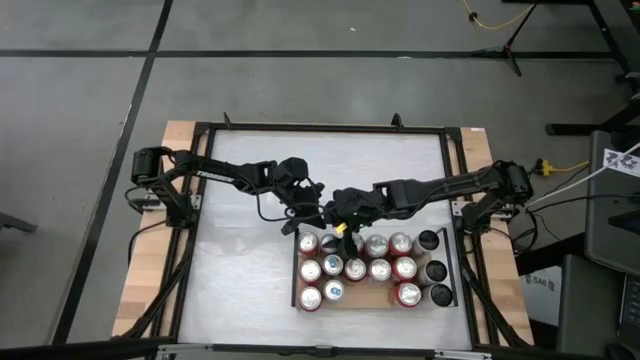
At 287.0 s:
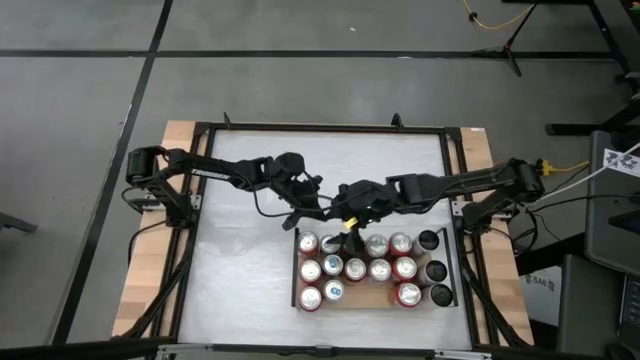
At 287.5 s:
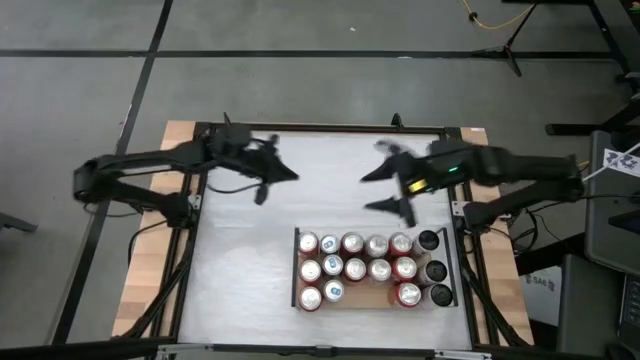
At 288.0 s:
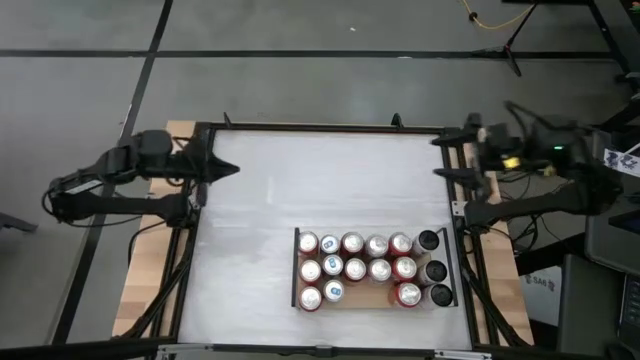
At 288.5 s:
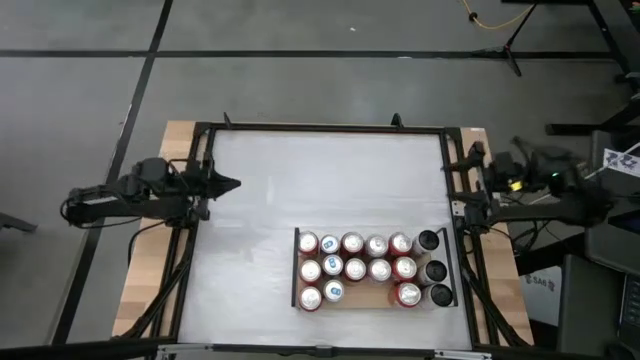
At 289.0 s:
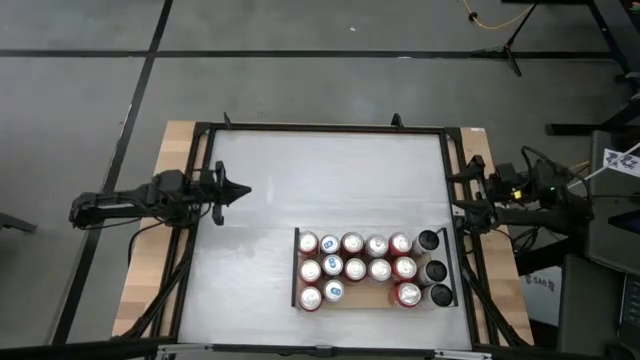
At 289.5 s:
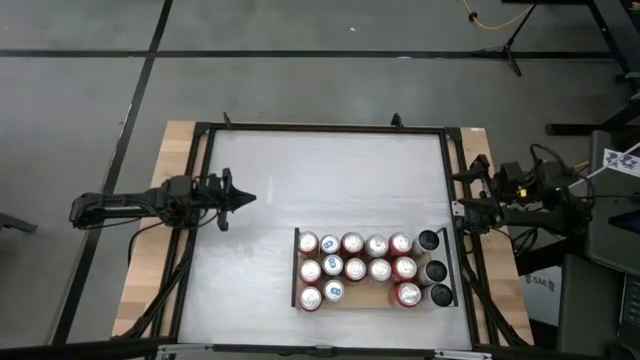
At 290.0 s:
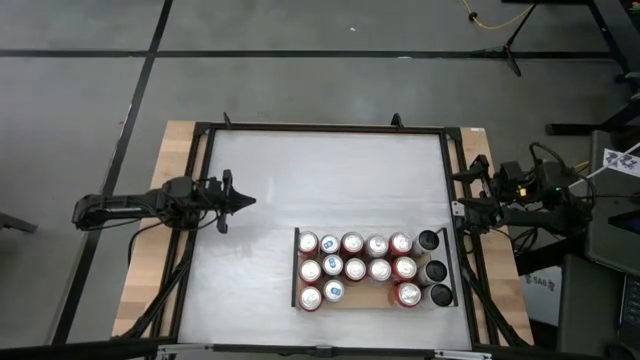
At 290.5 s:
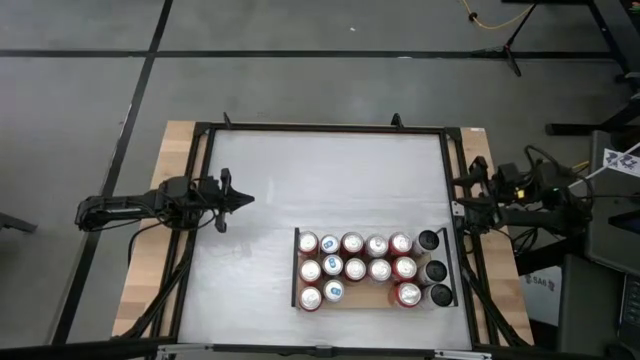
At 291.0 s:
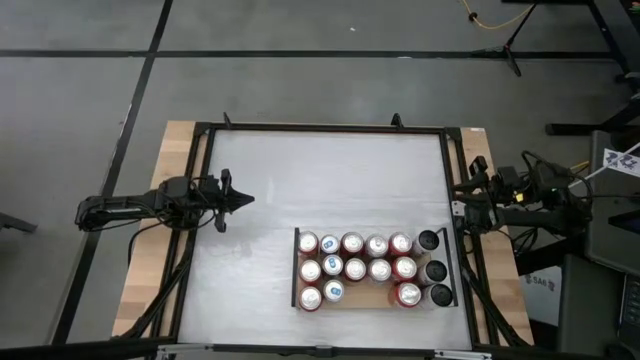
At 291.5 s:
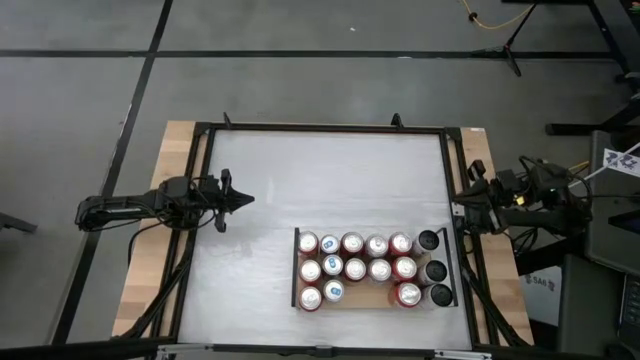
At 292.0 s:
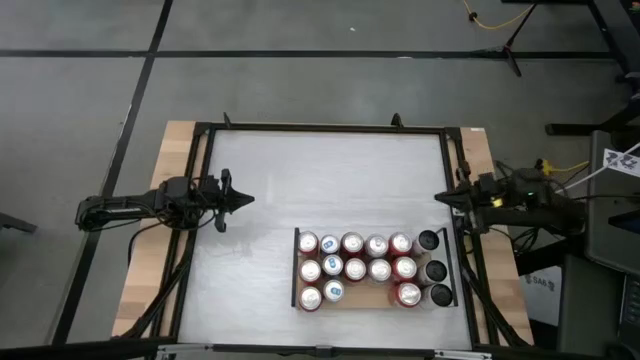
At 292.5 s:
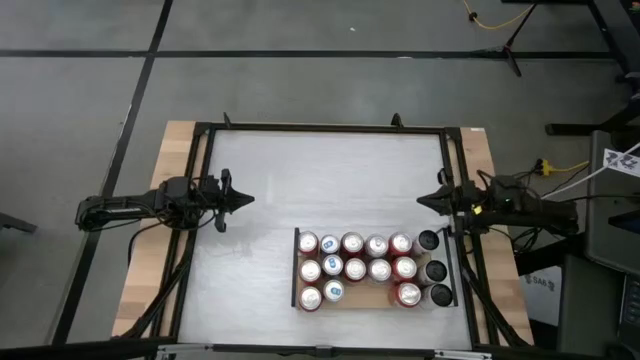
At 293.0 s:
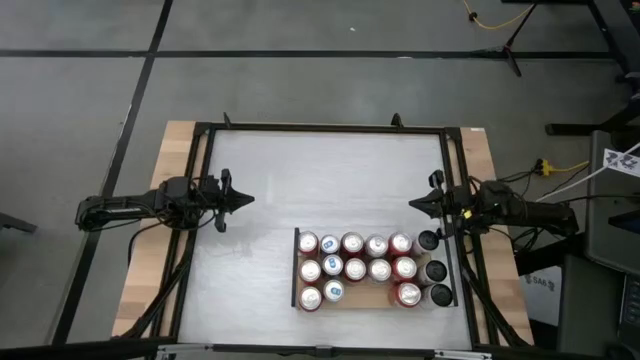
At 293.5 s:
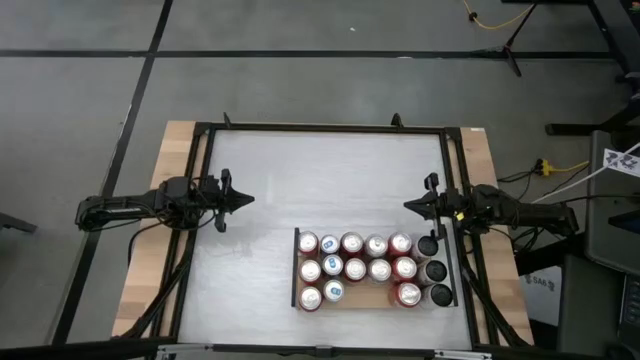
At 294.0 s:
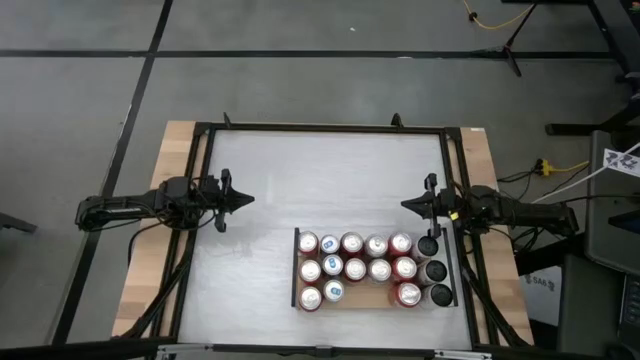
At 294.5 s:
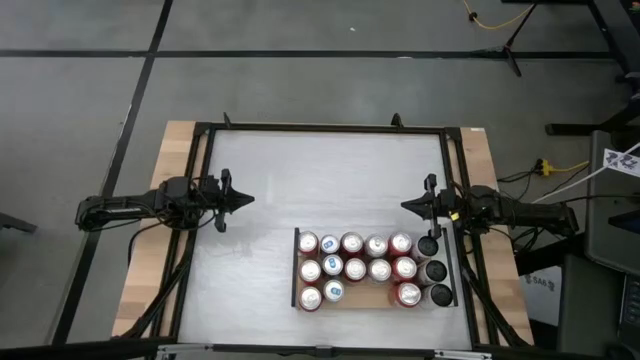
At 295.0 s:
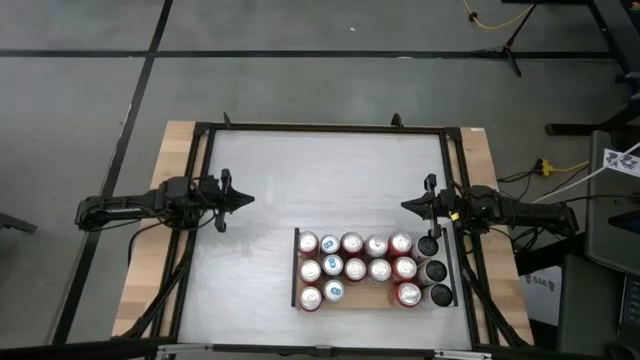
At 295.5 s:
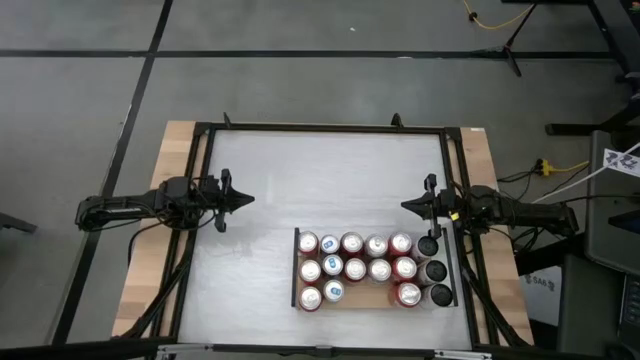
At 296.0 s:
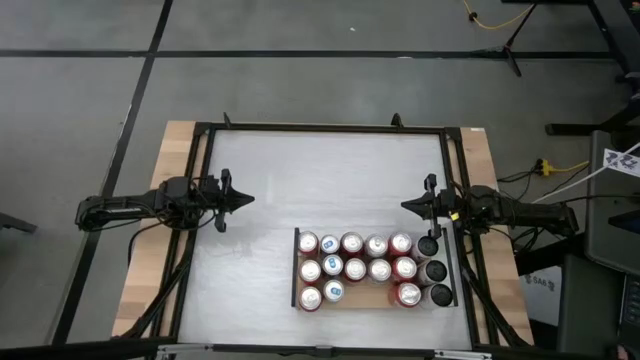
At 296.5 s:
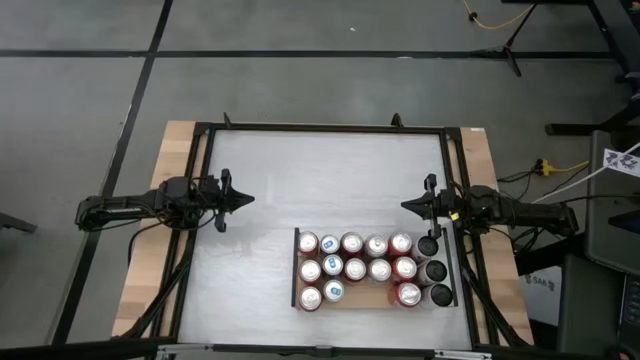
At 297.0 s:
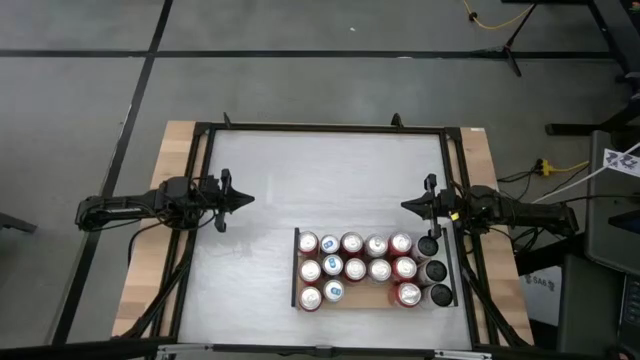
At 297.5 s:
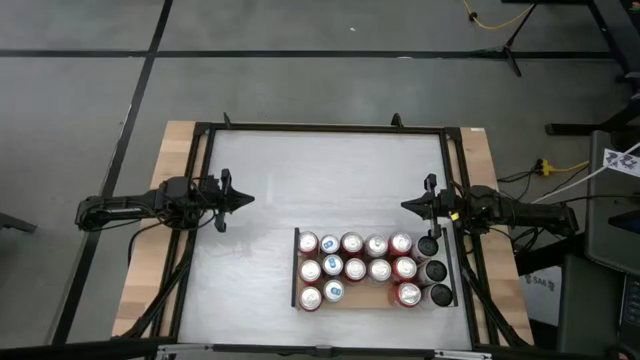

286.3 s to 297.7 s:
Task: Place canned beverage on shelf
Return to Home Position

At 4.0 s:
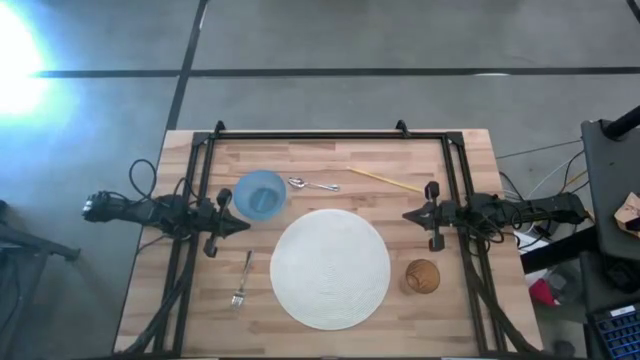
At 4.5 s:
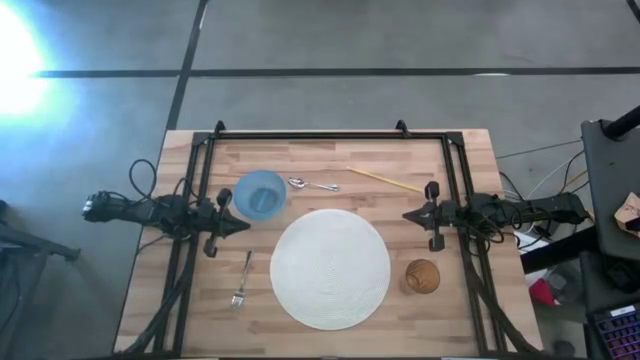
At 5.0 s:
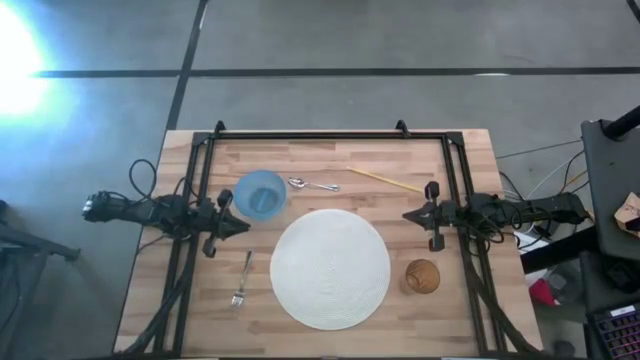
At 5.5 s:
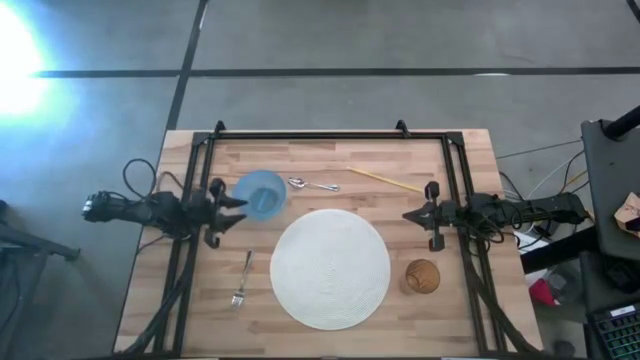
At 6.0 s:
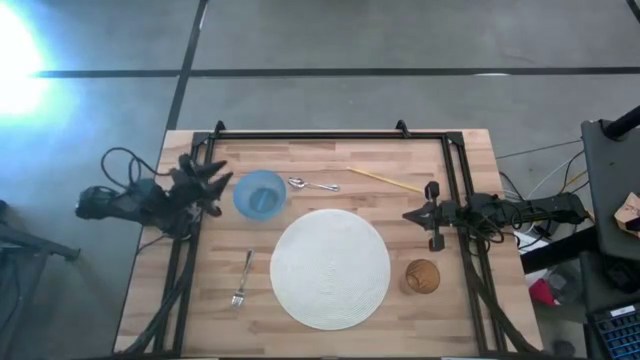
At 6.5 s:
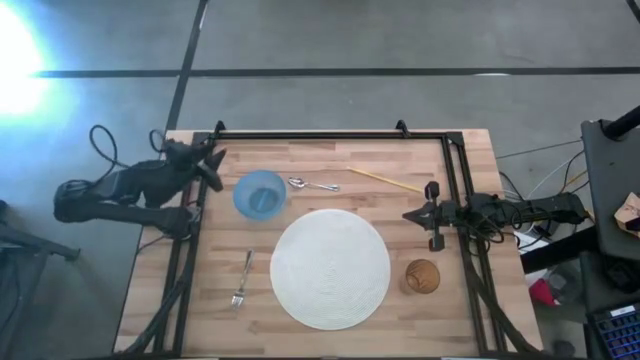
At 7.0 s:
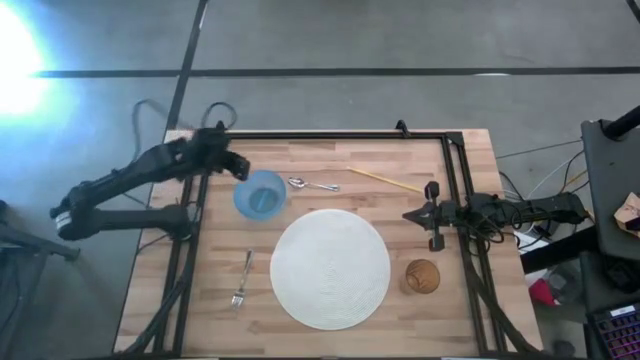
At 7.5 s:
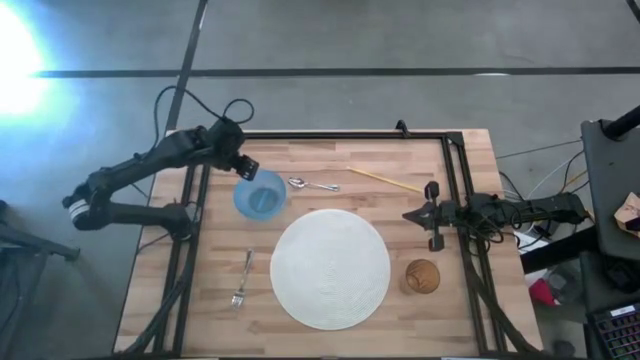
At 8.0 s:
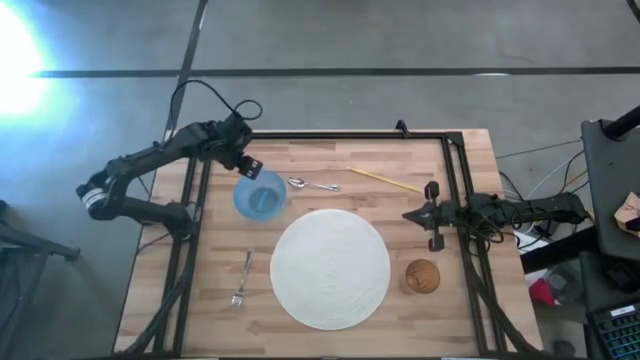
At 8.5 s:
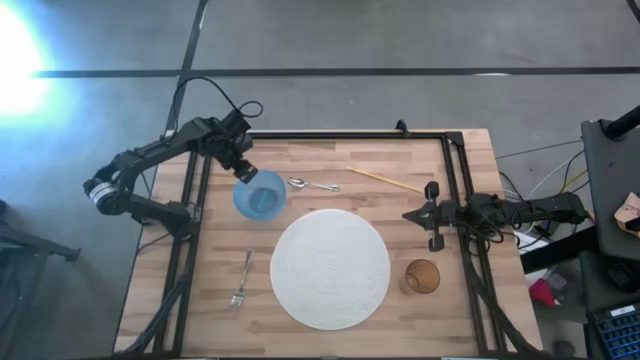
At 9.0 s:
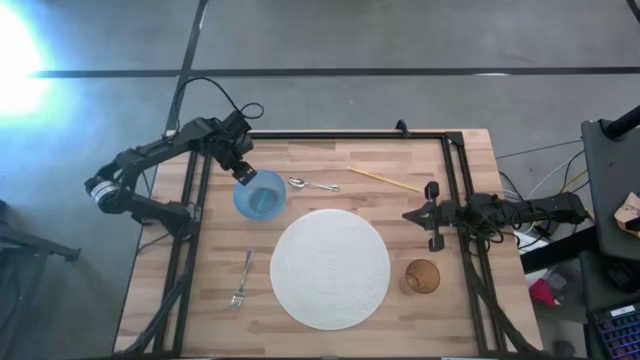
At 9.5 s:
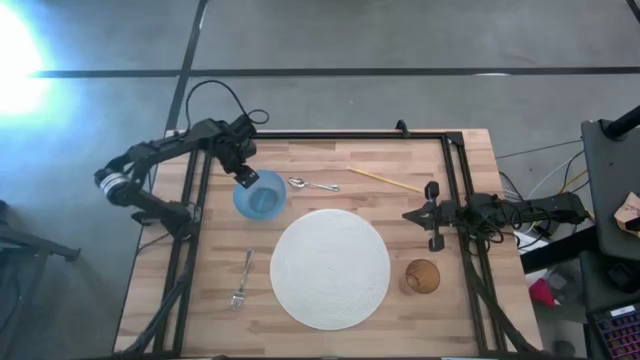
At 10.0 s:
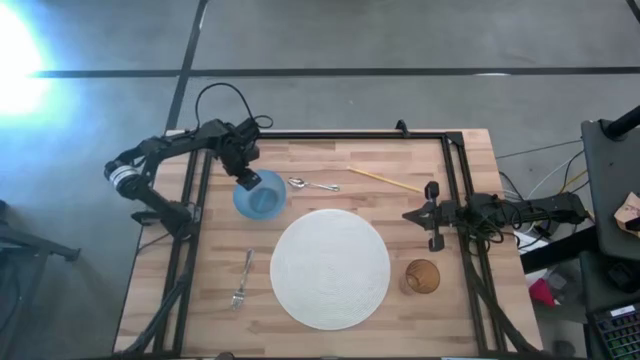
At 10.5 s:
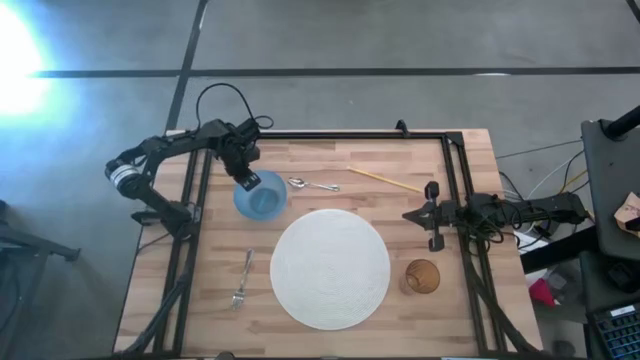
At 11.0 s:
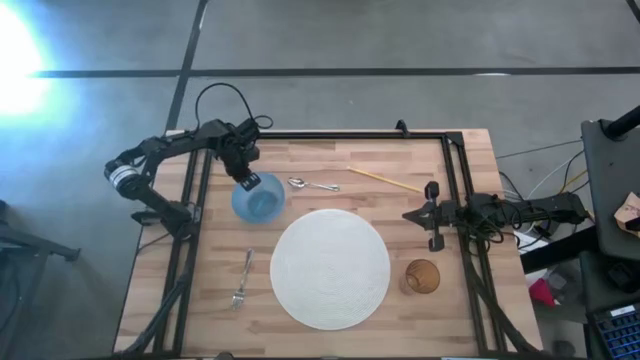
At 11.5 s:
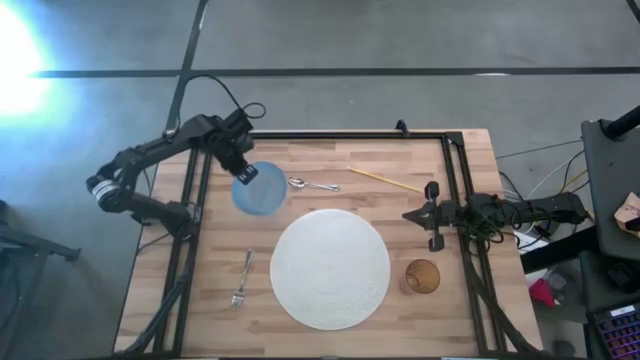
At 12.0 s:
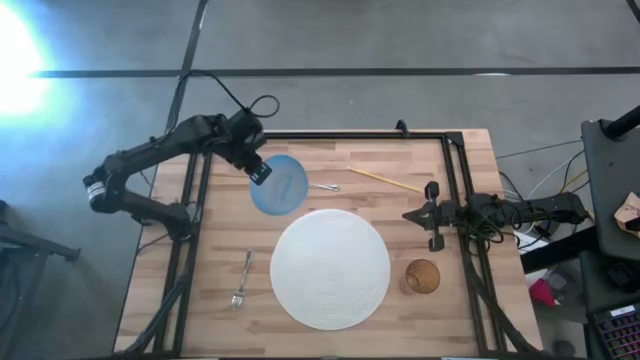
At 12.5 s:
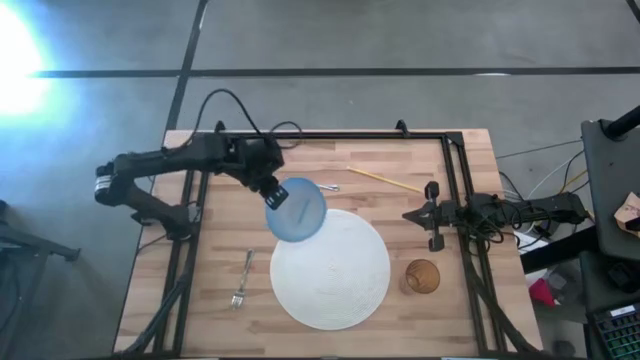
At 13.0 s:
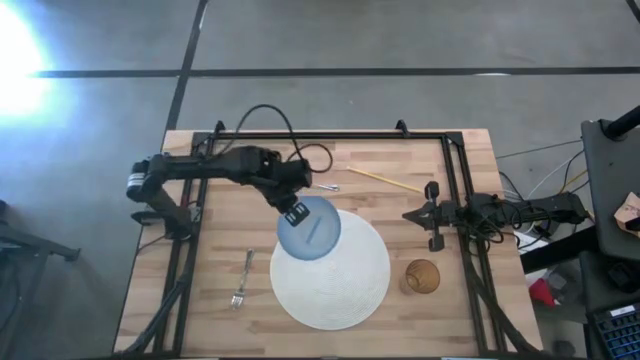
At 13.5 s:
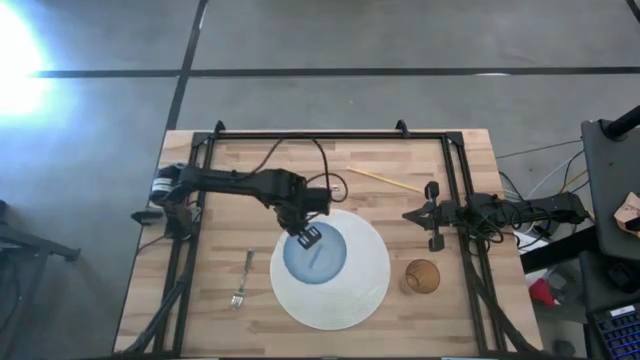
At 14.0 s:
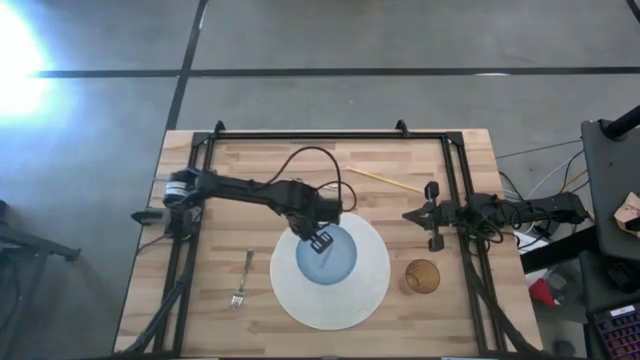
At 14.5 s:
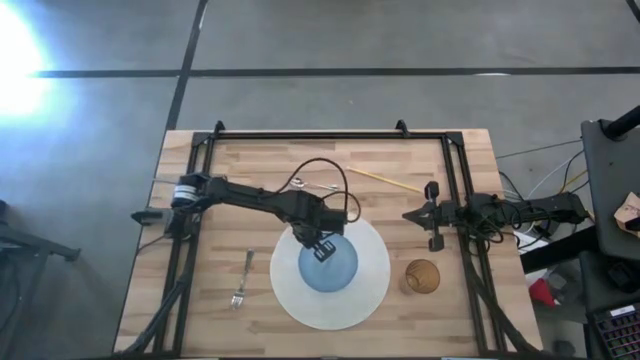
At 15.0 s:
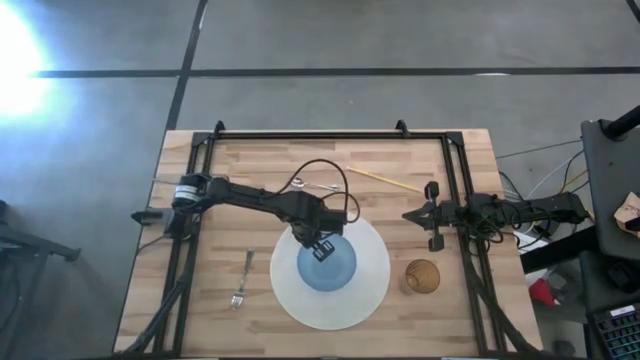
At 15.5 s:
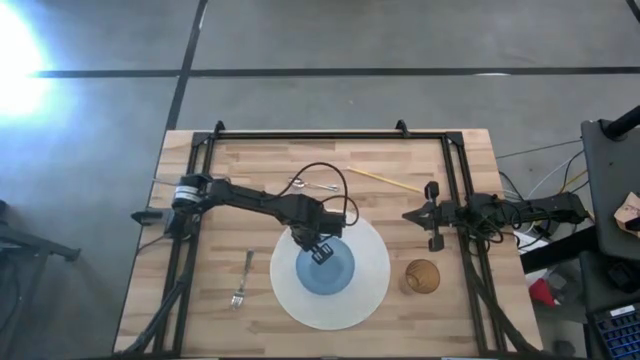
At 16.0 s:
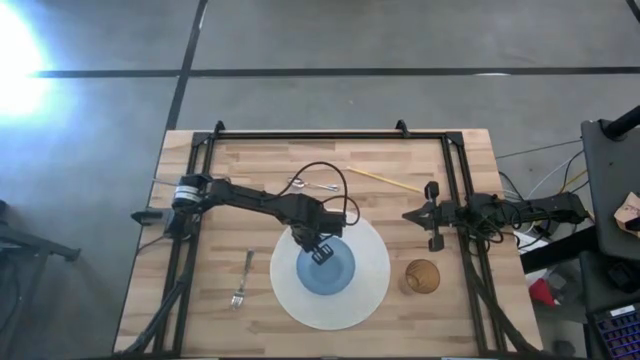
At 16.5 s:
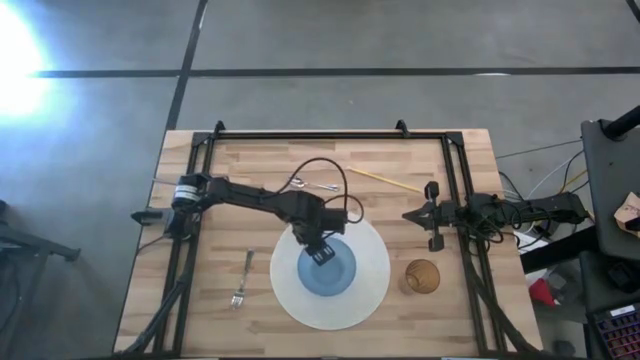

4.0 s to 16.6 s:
Task: Pick & Place Utensil
Put the blue bowl on the center of the white mat
